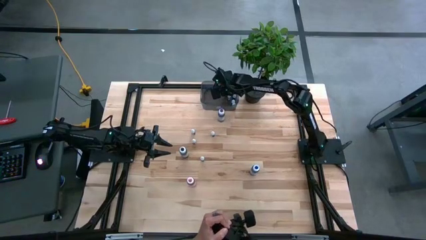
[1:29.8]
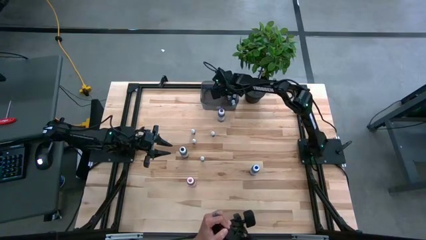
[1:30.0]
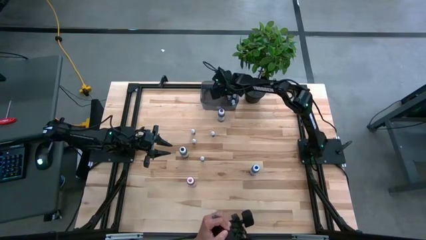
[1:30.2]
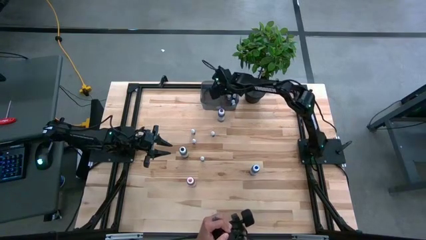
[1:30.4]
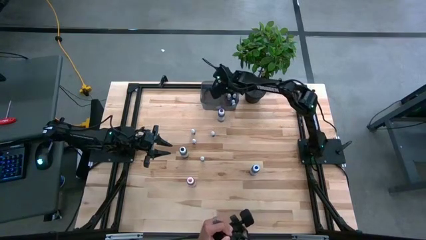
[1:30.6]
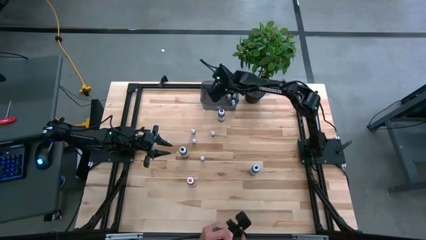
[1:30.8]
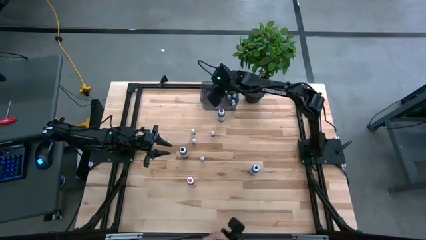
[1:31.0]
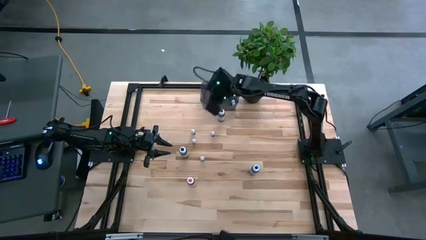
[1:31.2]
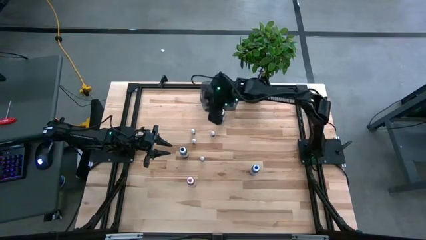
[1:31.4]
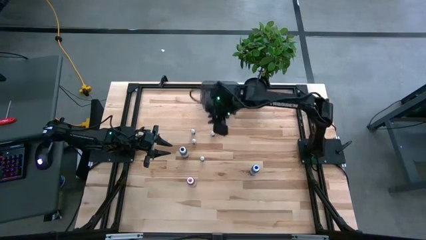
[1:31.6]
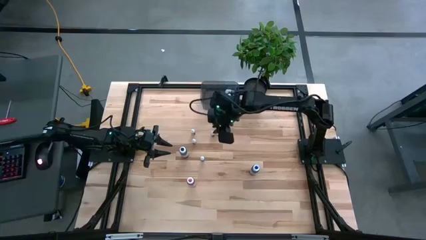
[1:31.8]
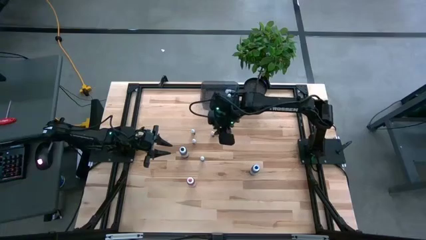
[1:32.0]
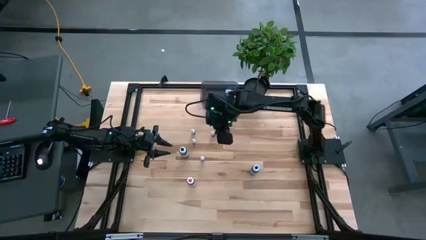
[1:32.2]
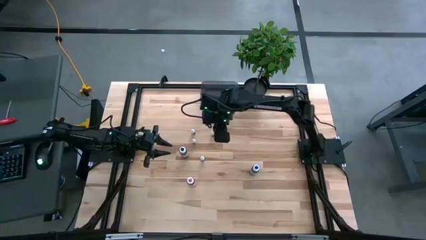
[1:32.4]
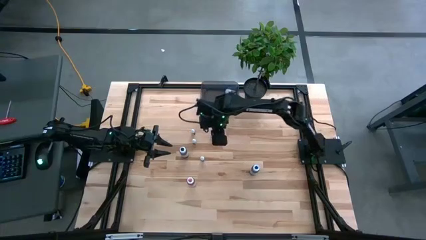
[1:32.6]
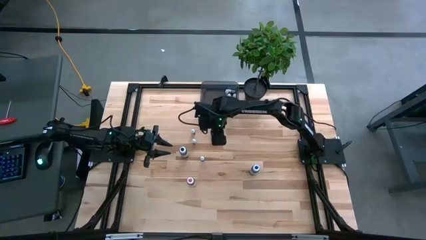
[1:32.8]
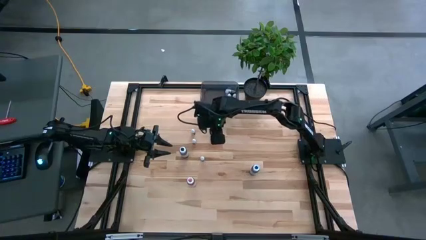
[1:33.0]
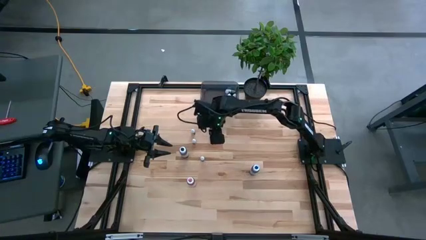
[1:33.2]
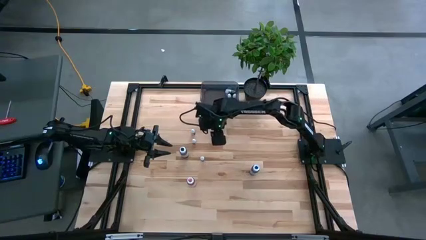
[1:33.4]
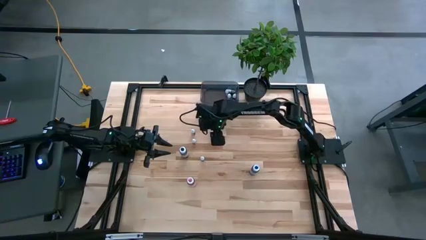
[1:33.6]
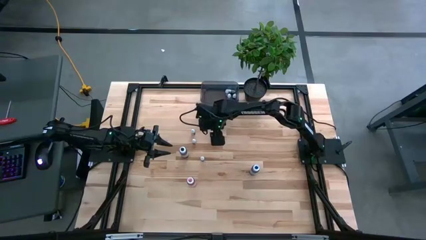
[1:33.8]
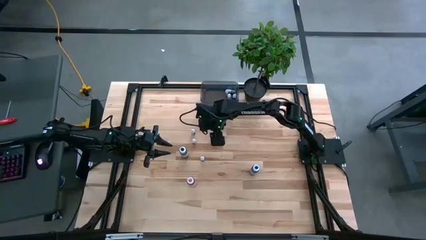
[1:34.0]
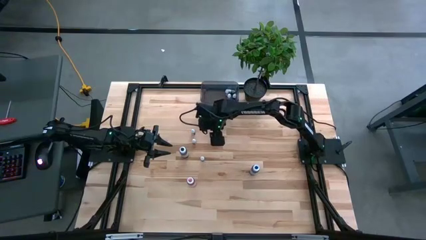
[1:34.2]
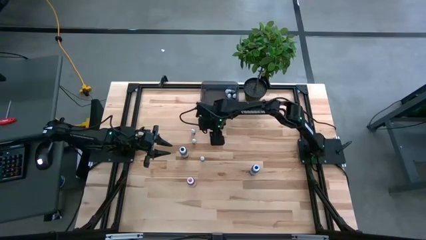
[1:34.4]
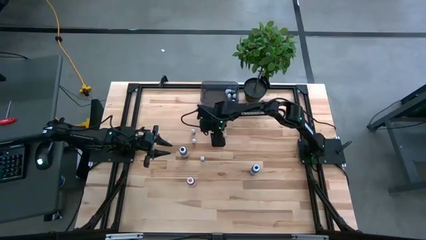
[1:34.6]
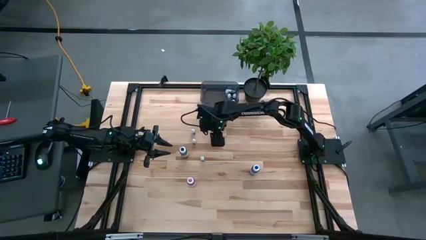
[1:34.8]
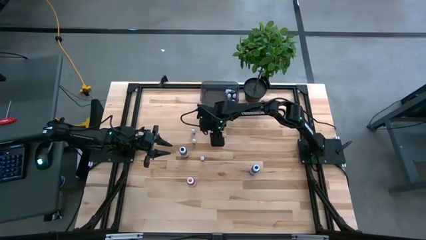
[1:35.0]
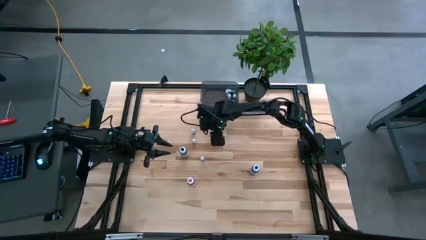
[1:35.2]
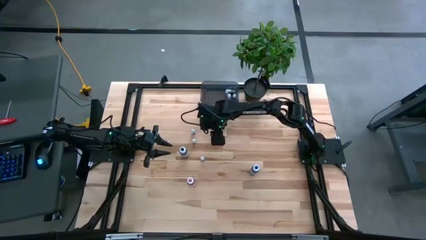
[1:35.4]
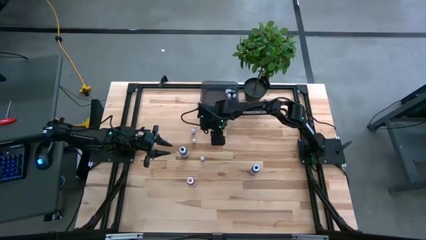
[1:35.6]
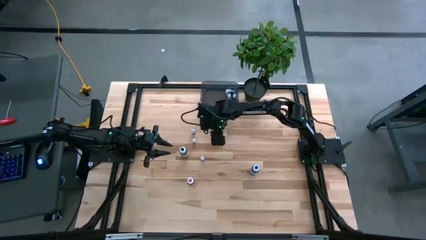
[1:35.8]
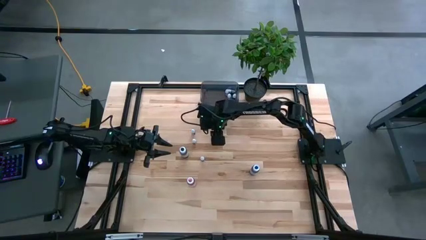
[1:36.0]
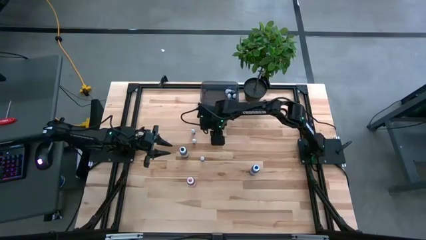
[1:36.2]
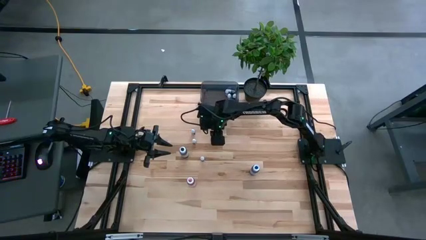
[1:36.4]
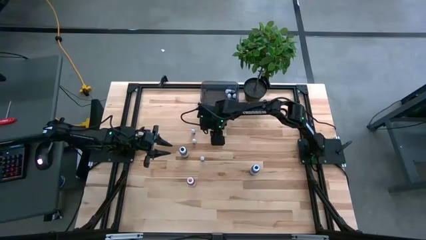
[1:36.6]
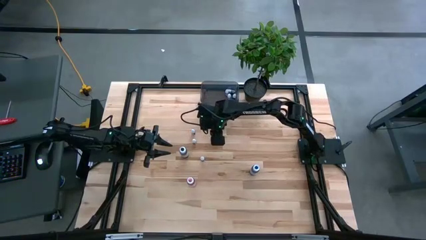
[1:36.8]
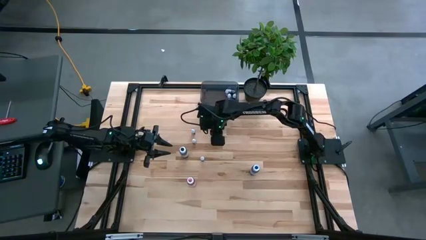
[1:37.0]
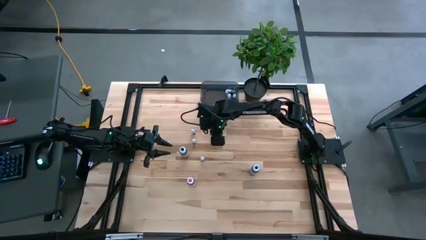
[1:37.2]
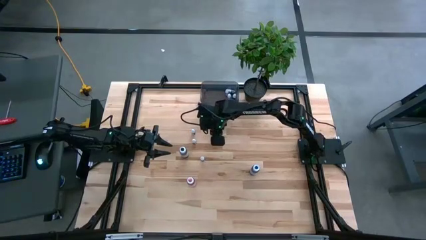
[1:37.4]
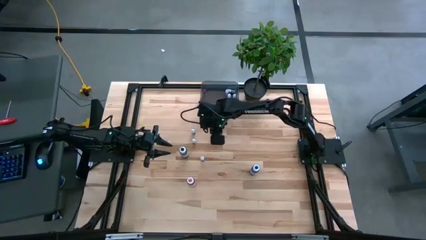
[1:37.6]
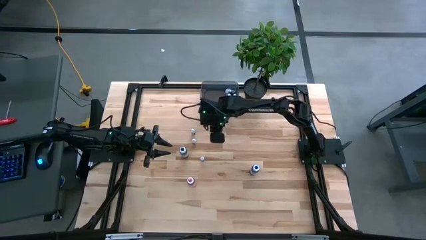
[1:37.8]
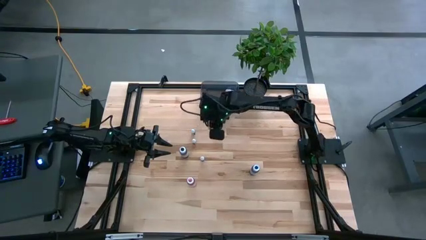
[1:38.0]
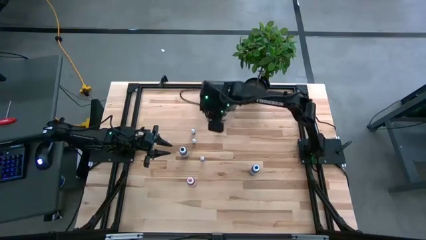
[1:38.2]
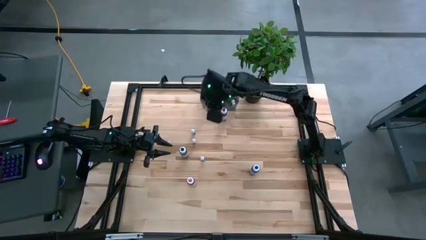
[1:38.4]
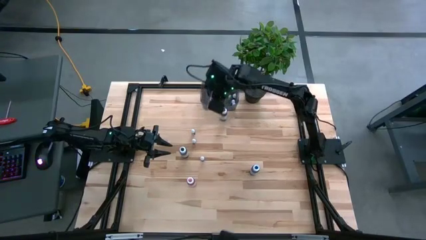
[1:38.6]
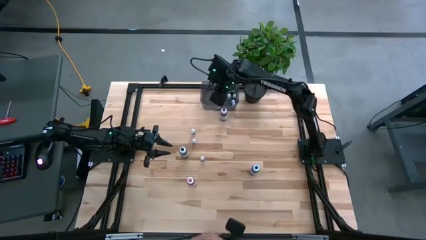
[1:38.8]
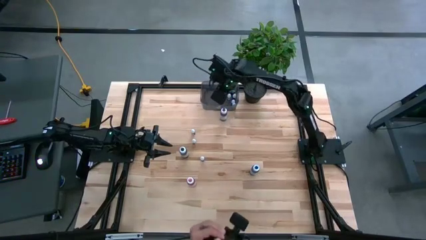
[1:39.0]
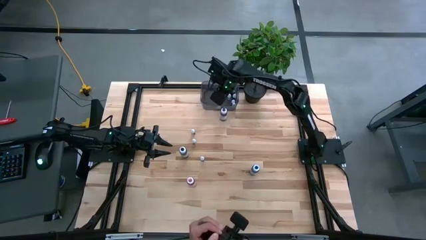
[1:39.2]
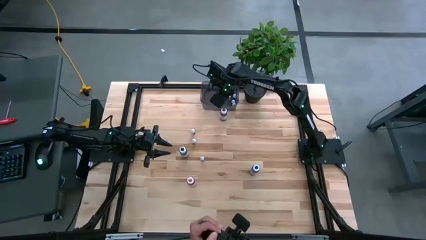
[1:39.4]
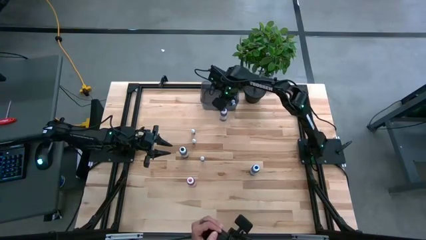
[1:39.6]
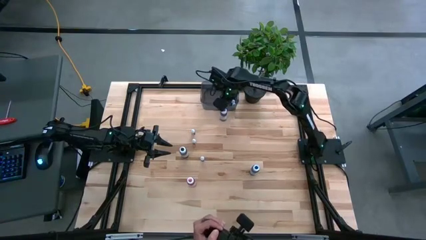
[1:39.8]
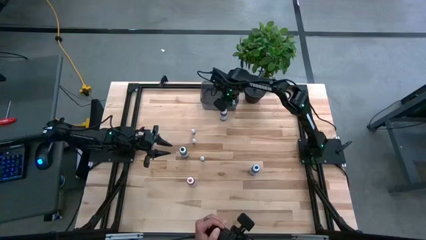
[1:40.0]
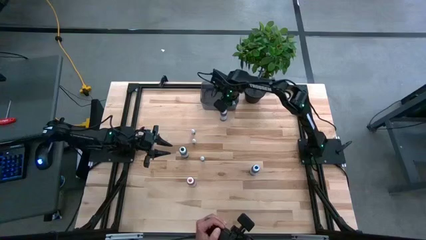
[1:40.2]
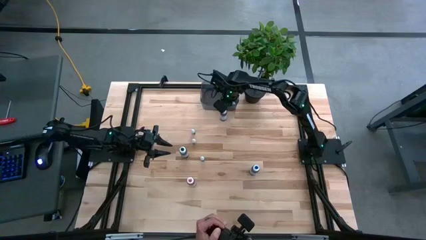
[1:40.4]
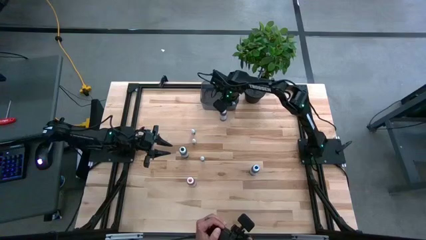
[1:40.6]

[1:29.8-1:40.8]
Task: Pick & Place food coloring
Put the small green food coloring bottle into the black bin
